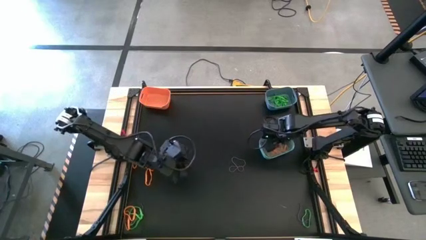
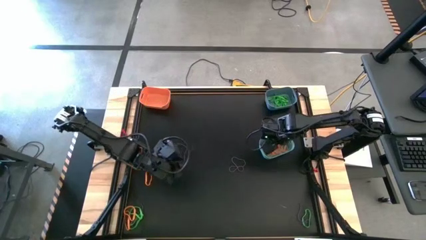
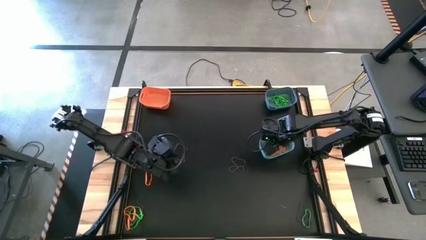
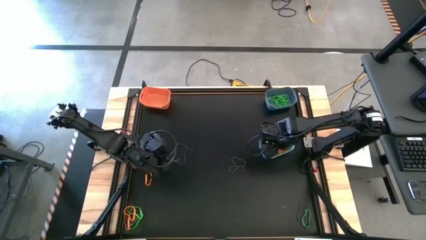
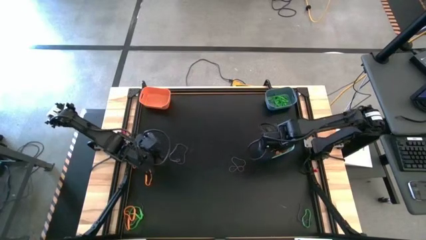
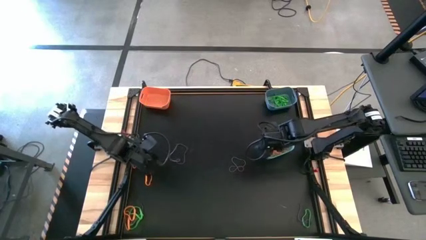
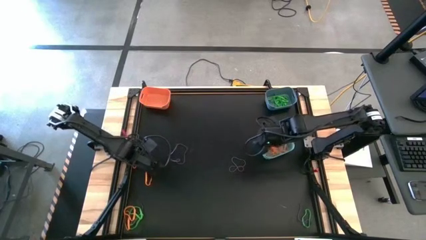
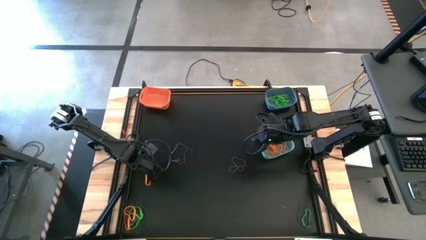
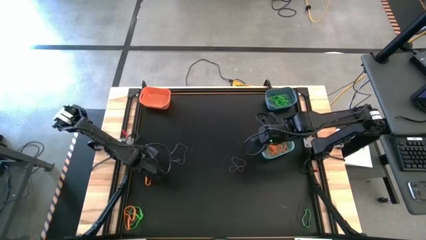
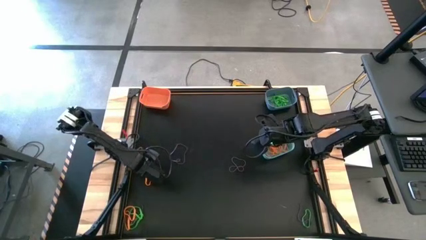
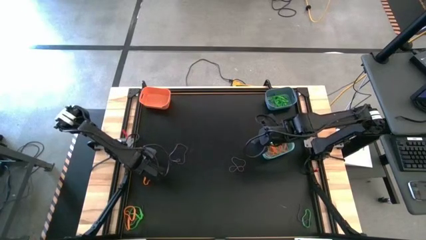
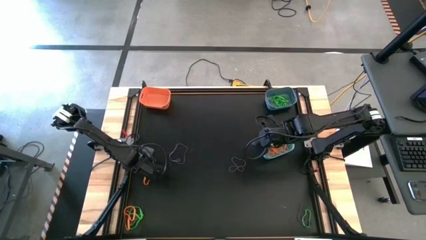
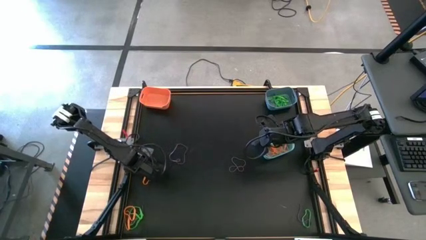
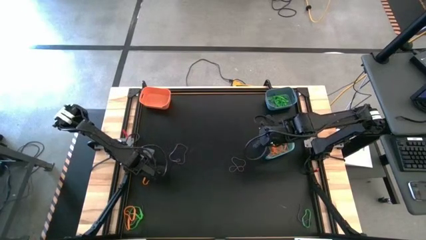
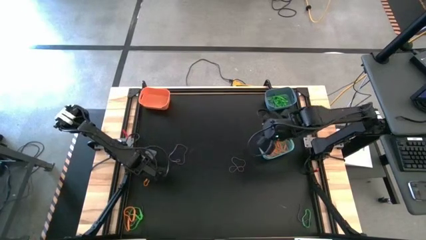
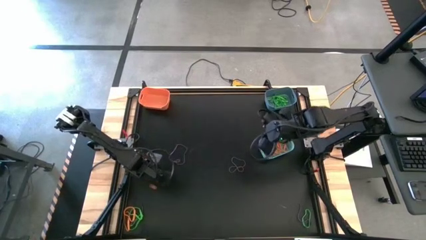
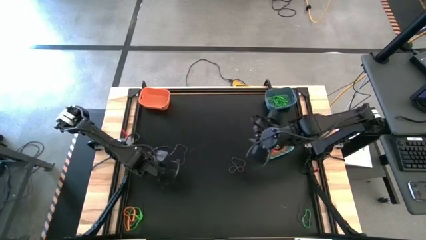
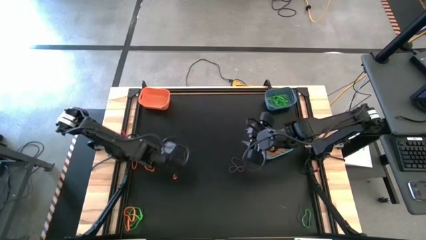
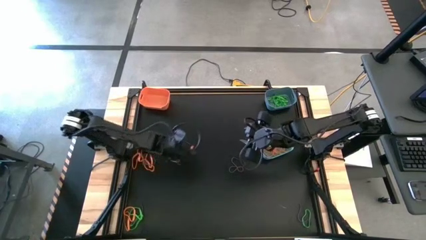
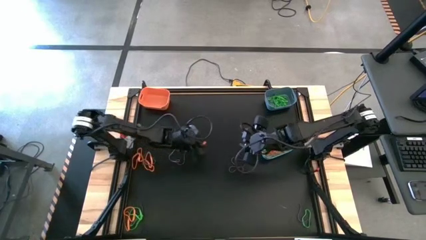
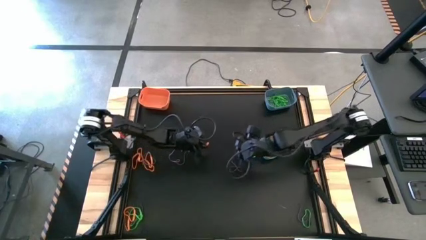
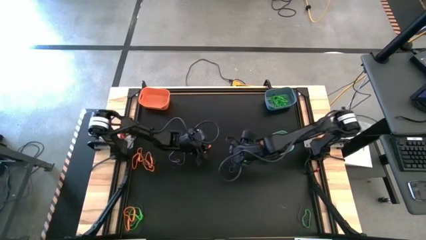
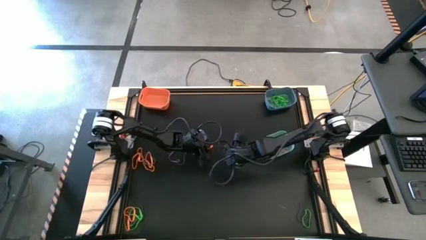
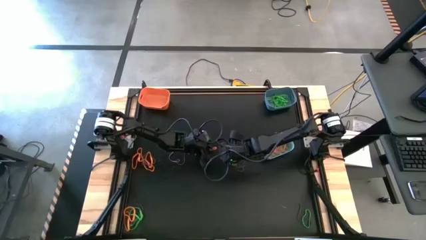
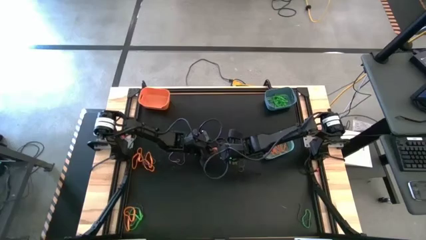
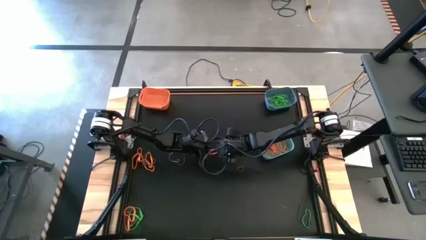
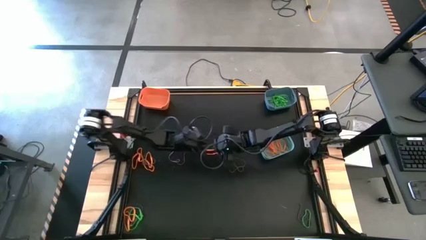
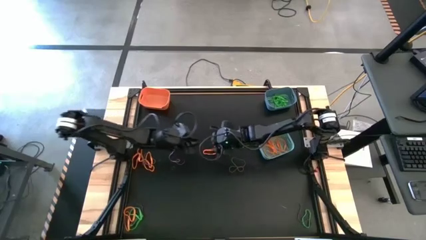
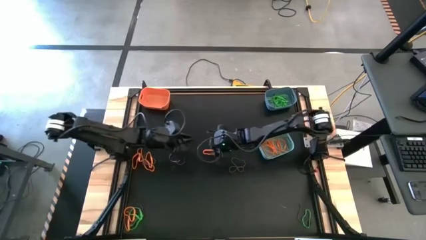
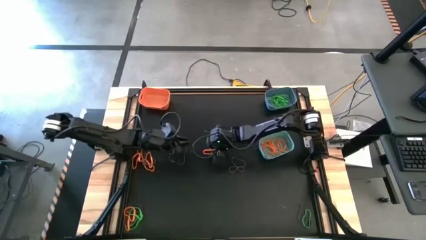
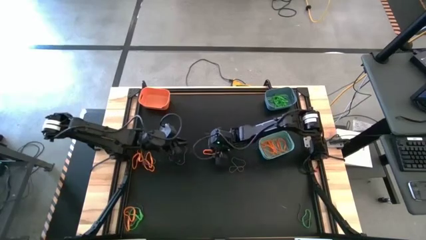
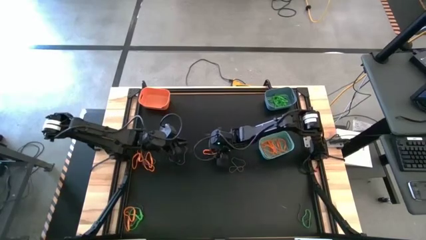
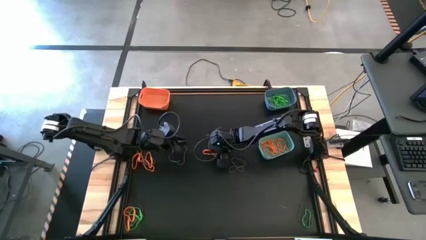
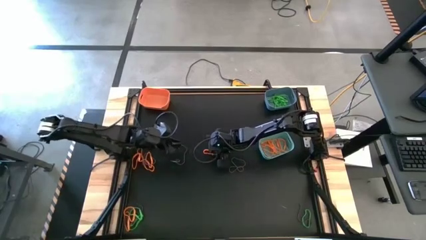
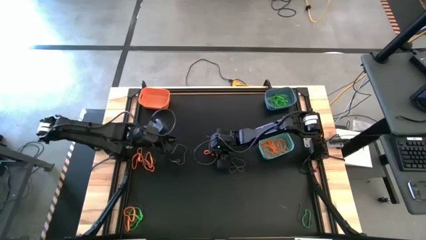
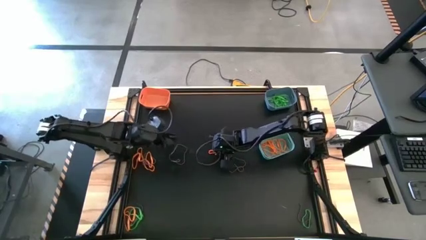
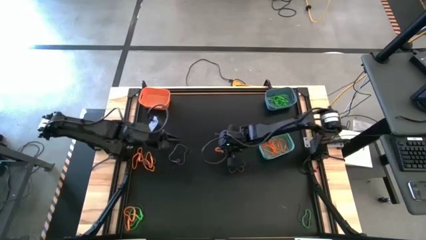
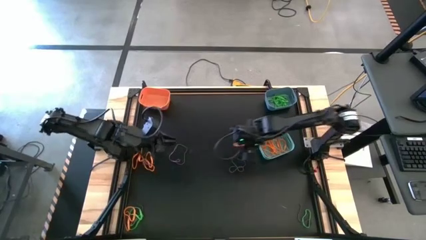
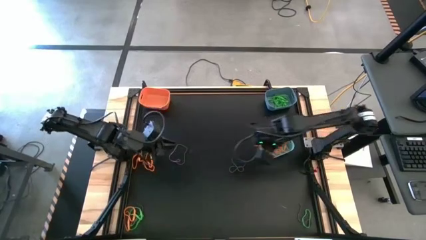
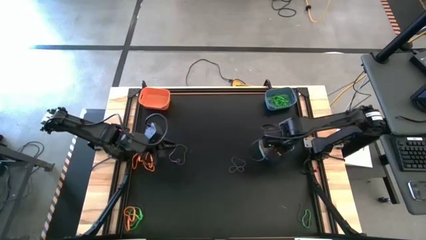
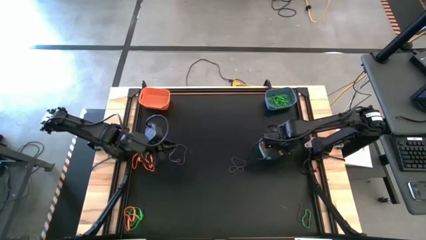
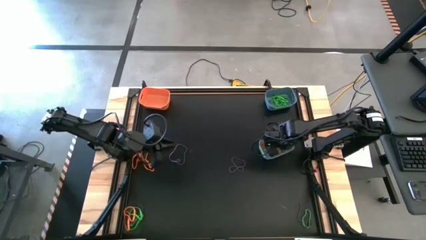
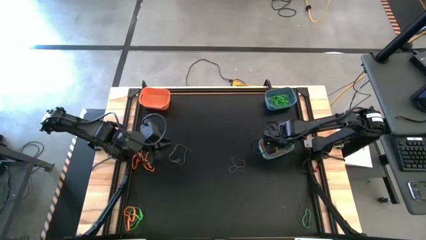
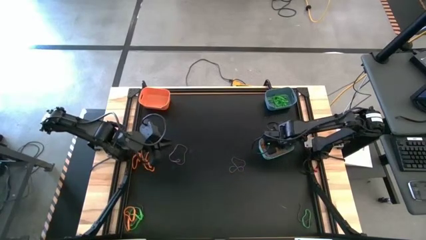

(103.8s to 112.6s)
Task: Sort rubber bands into baskets
Put the orange rubber band into the green bin

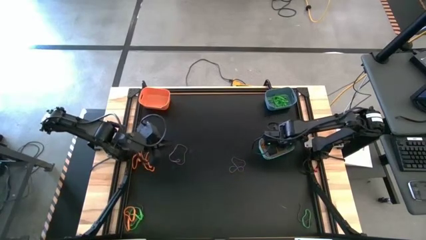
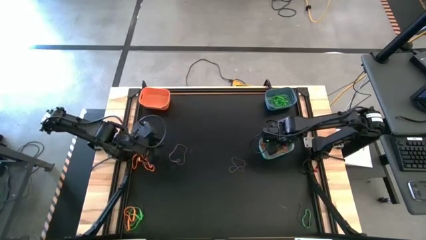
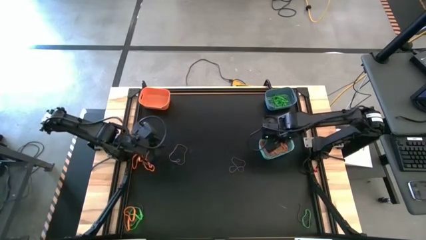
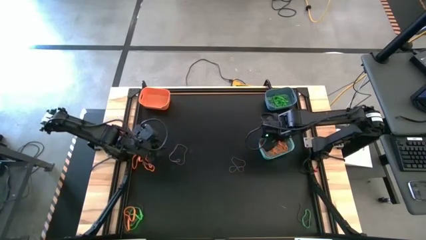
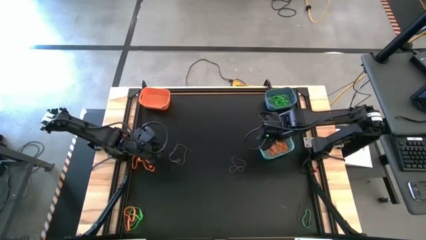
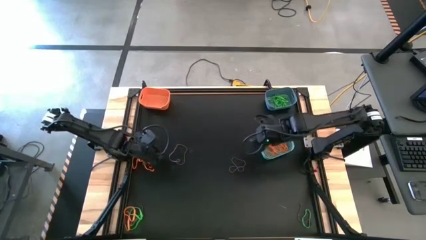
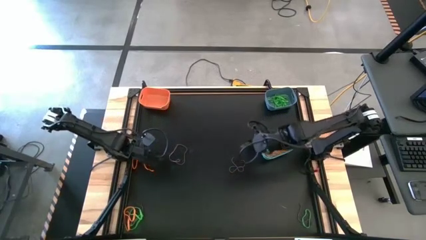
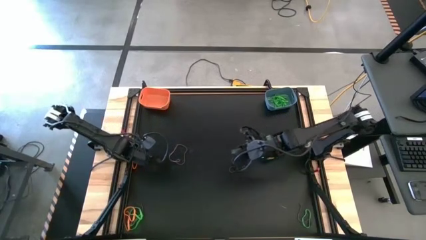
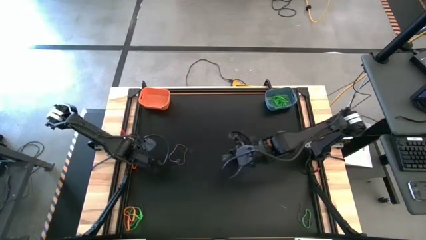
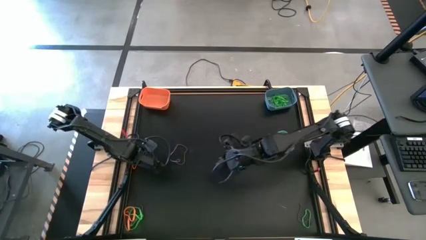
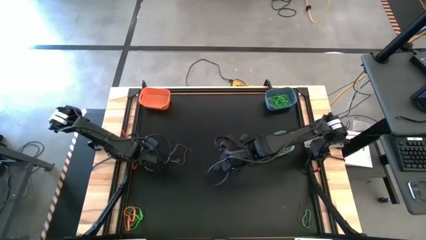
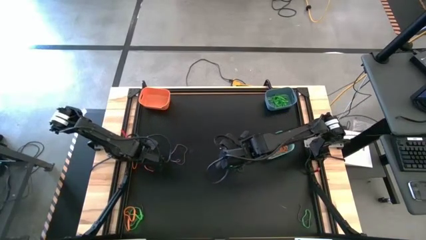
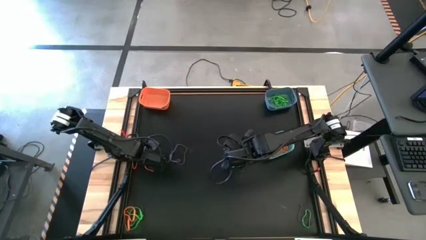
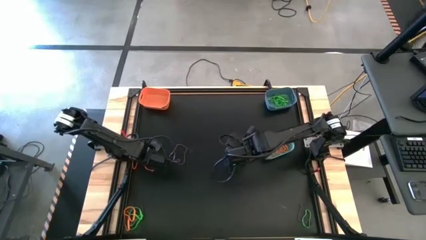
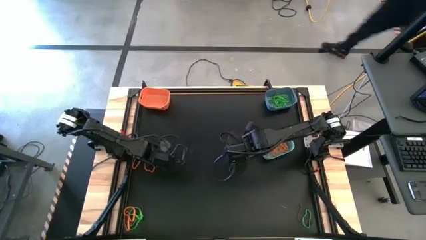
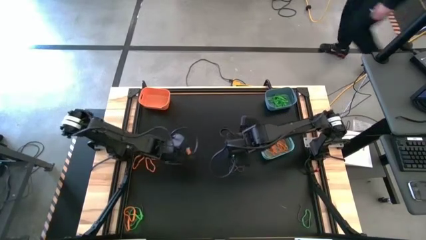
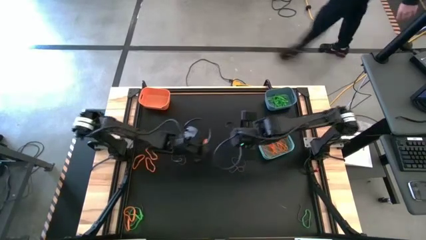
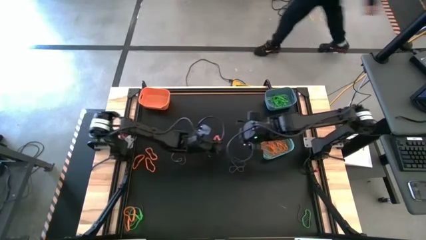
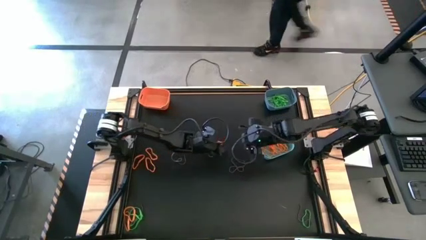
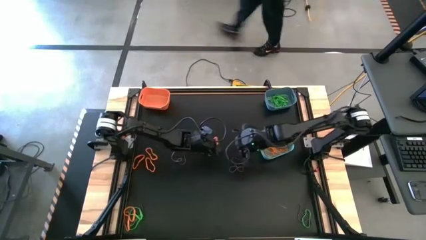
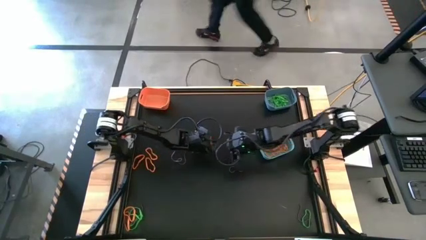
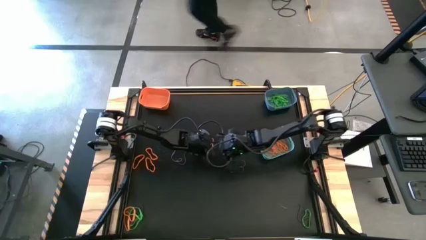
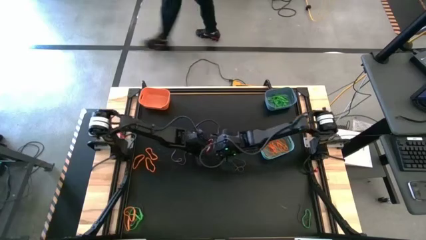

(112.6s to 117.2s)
Put the orange rubber band into the green bin

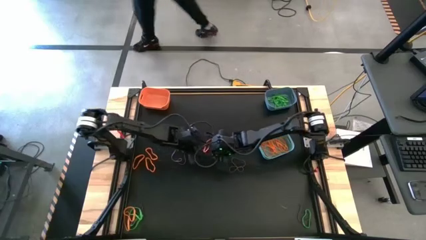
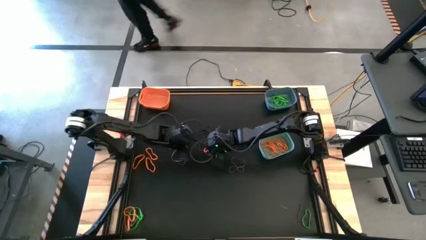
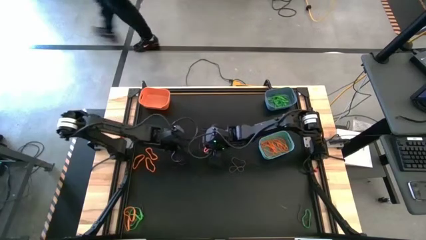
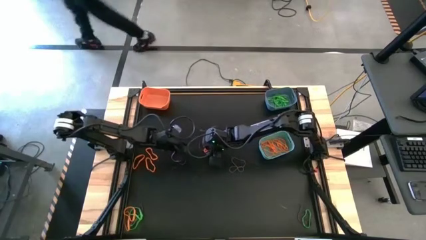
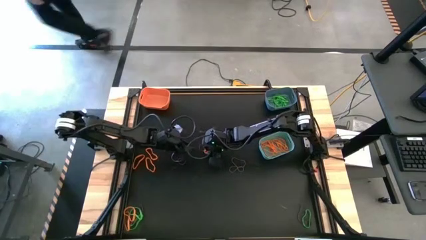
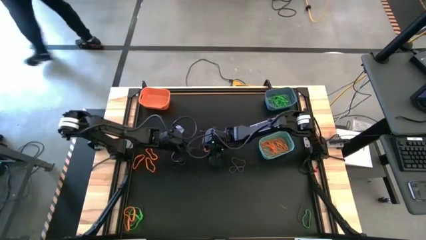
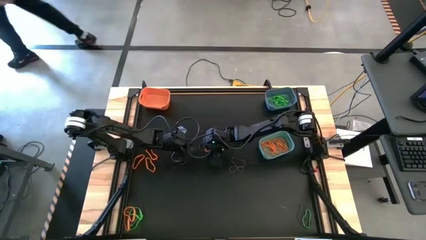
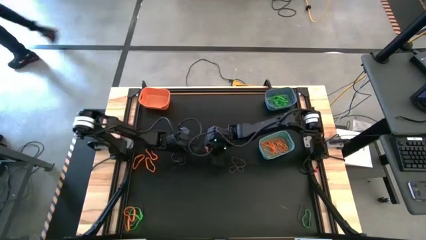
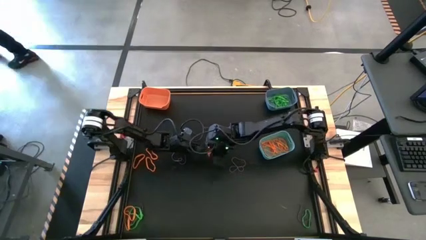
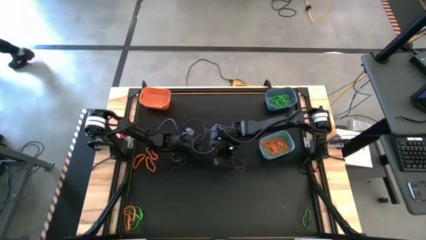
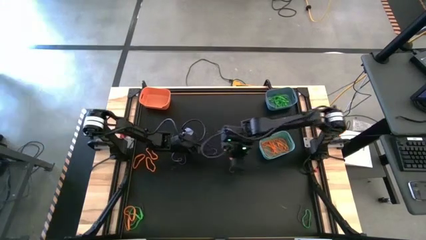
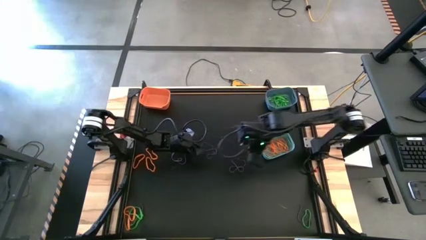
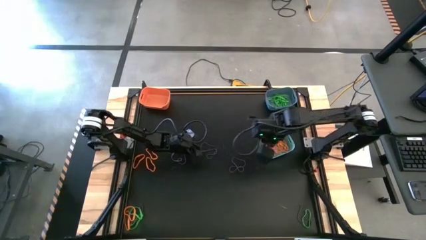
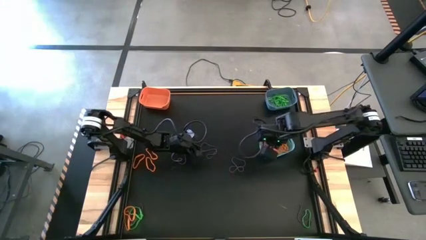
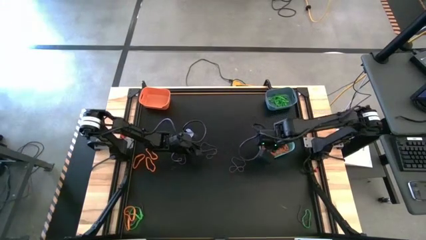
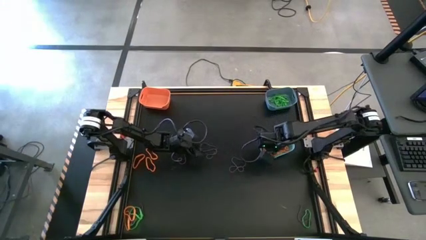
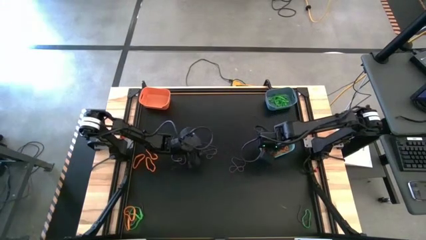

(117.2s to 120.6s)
Put the orange rubber band into the green bin
